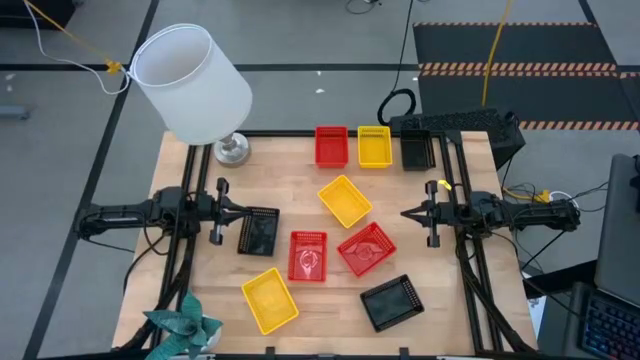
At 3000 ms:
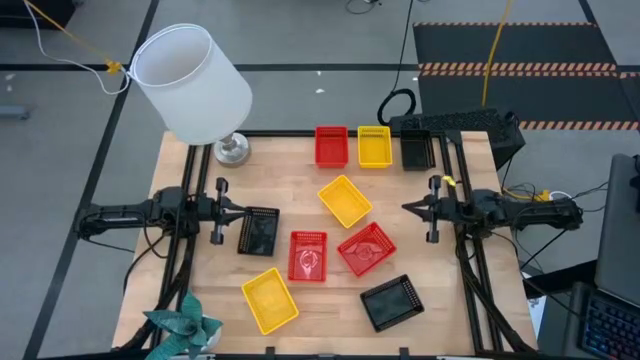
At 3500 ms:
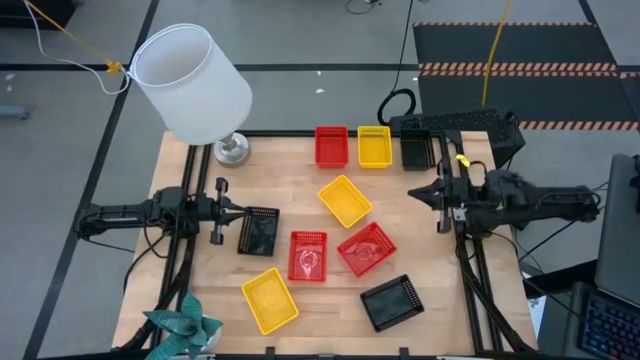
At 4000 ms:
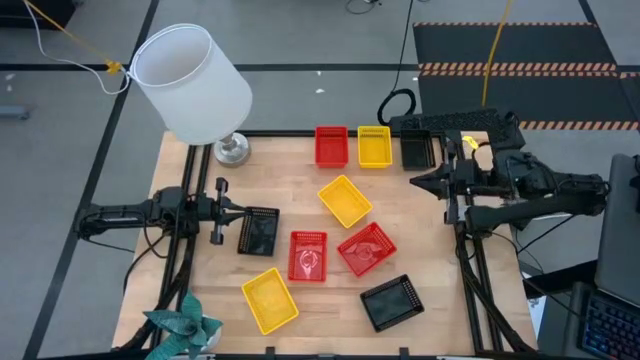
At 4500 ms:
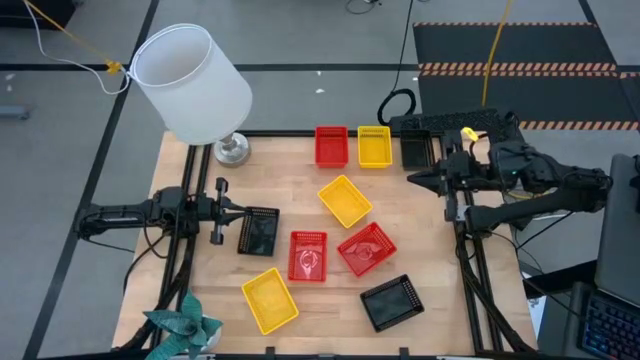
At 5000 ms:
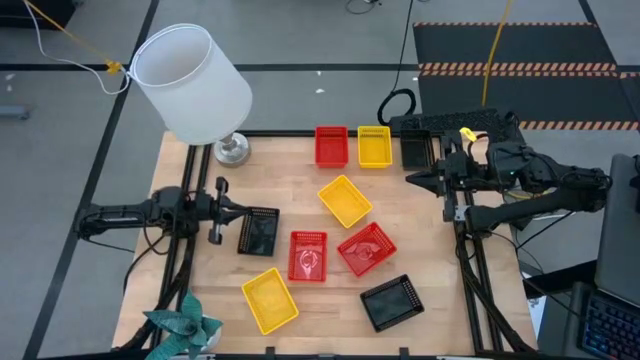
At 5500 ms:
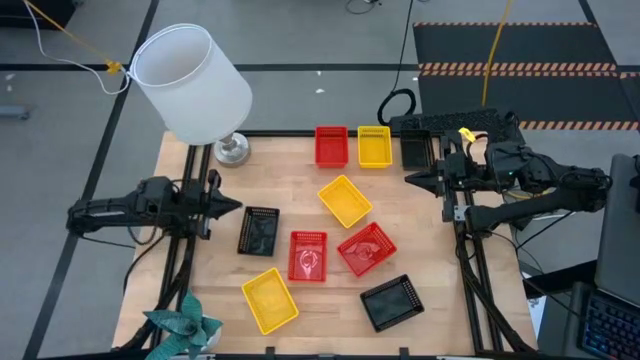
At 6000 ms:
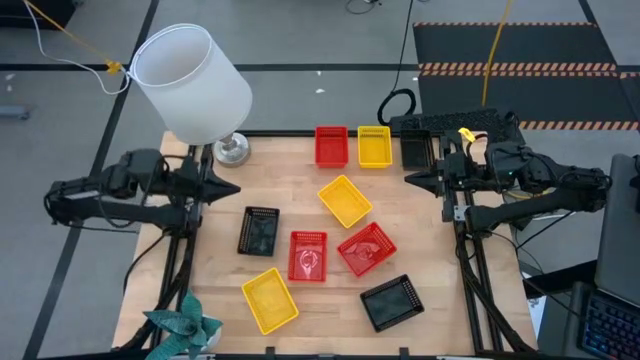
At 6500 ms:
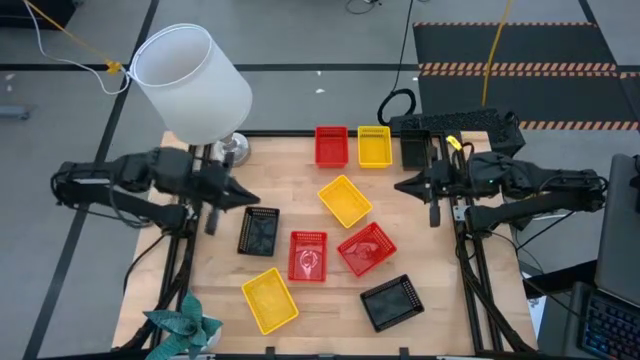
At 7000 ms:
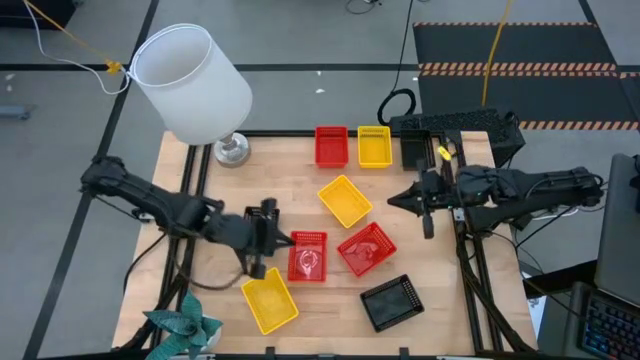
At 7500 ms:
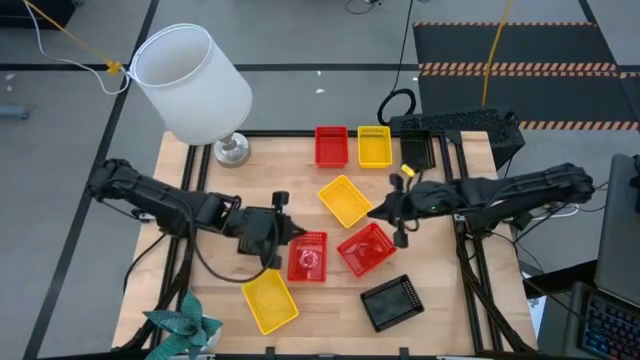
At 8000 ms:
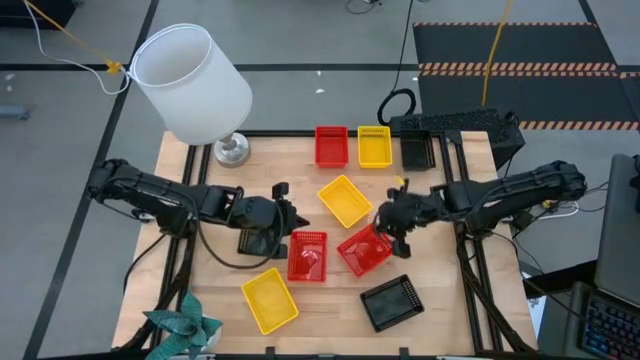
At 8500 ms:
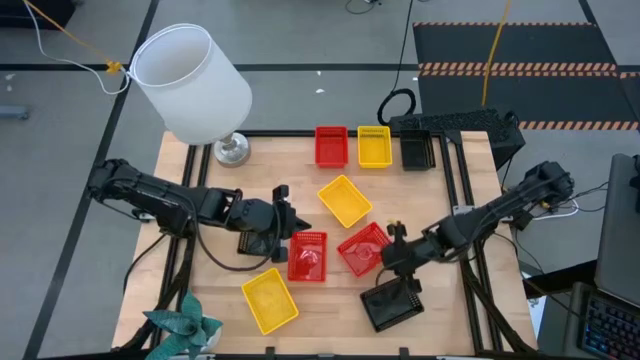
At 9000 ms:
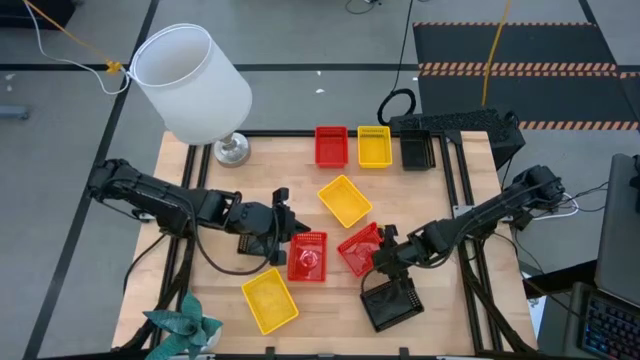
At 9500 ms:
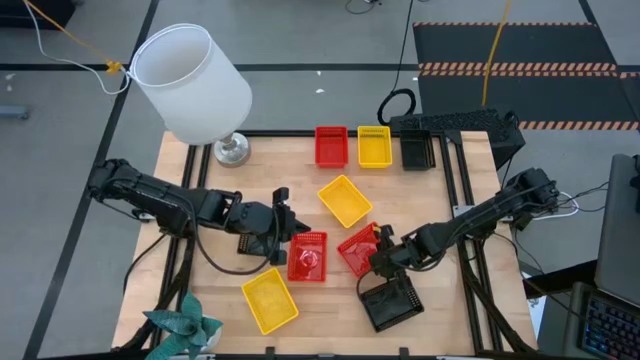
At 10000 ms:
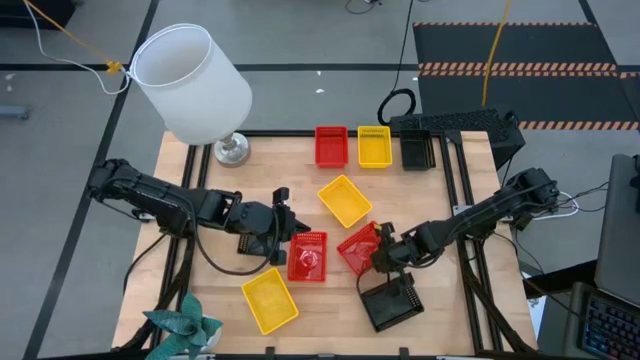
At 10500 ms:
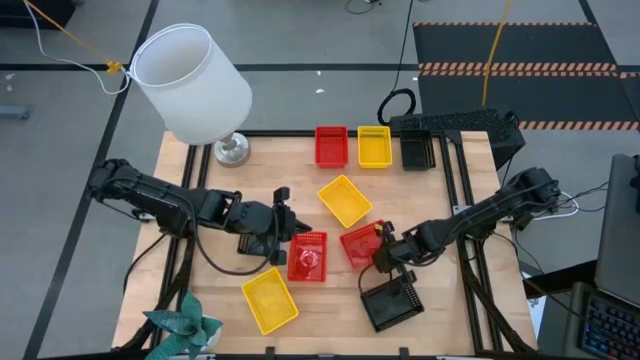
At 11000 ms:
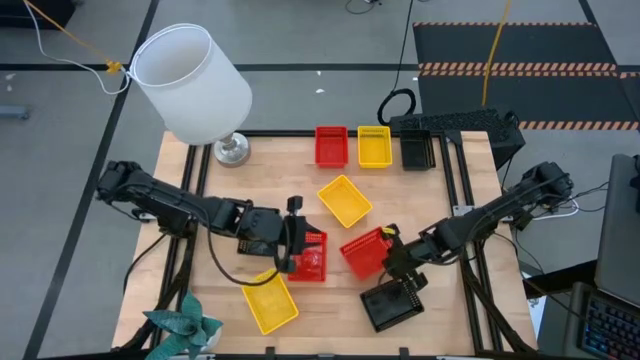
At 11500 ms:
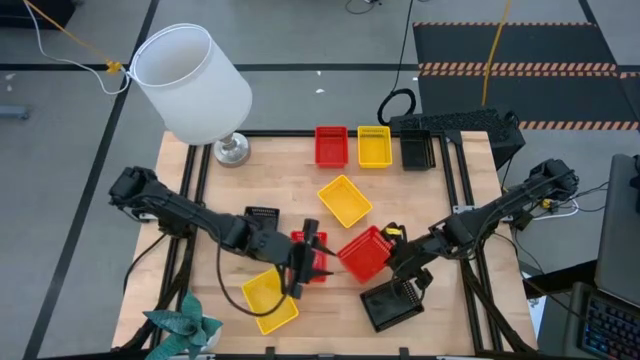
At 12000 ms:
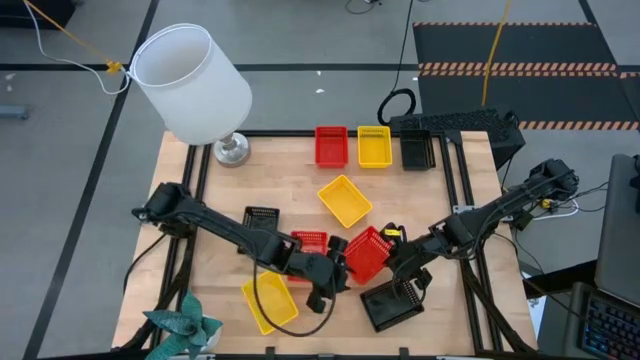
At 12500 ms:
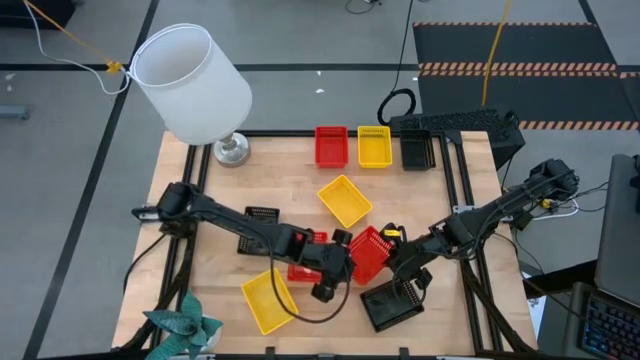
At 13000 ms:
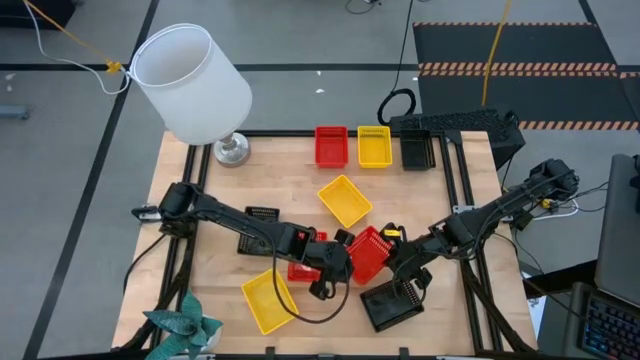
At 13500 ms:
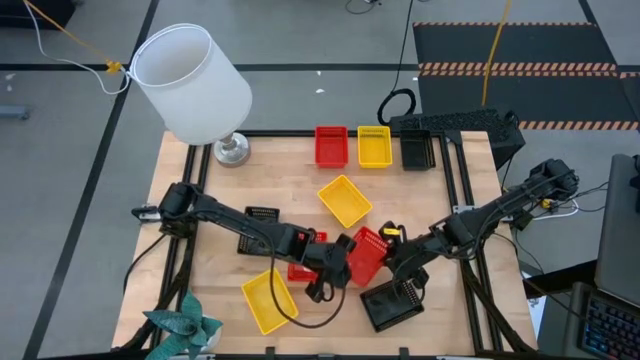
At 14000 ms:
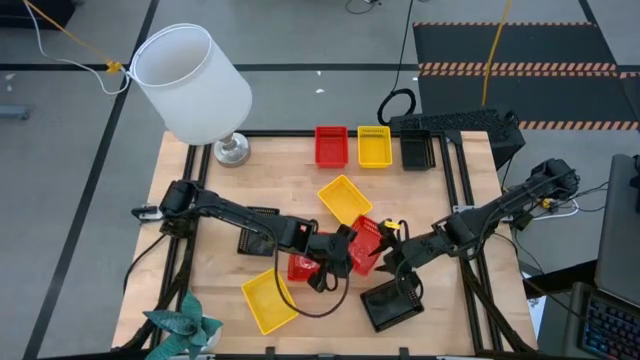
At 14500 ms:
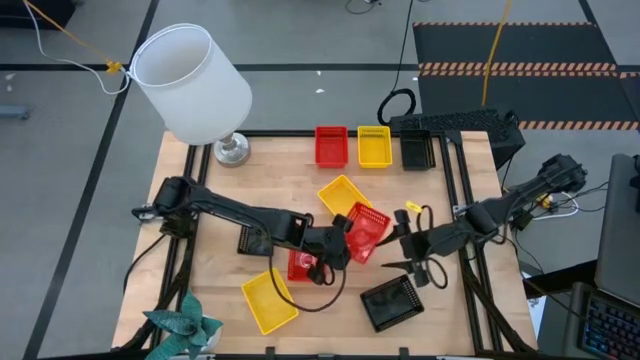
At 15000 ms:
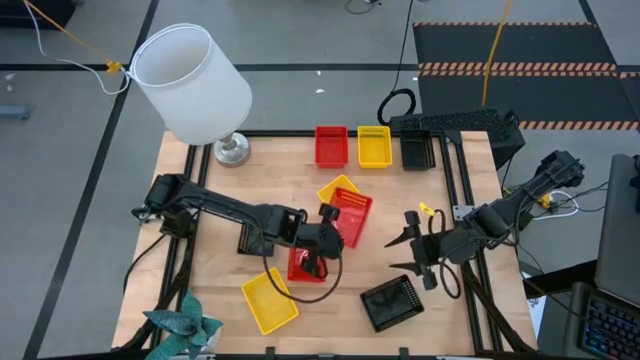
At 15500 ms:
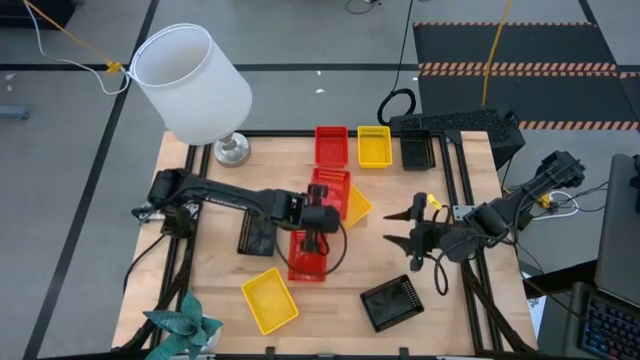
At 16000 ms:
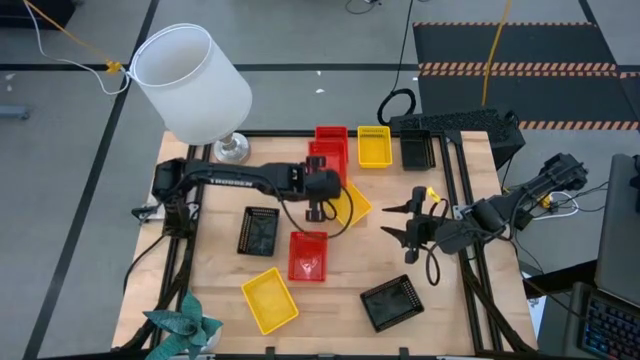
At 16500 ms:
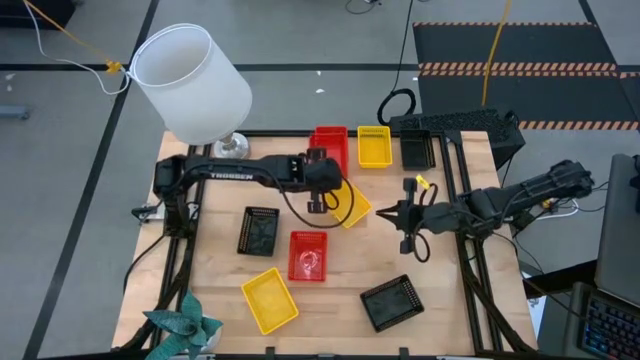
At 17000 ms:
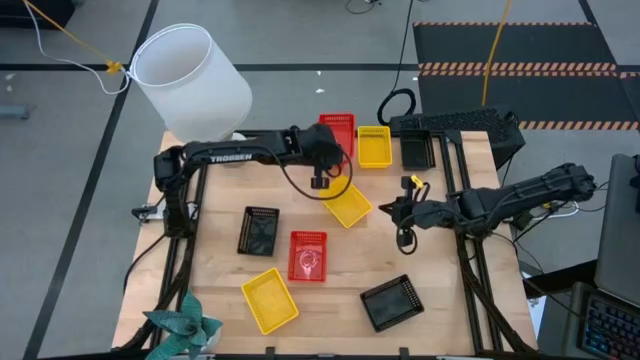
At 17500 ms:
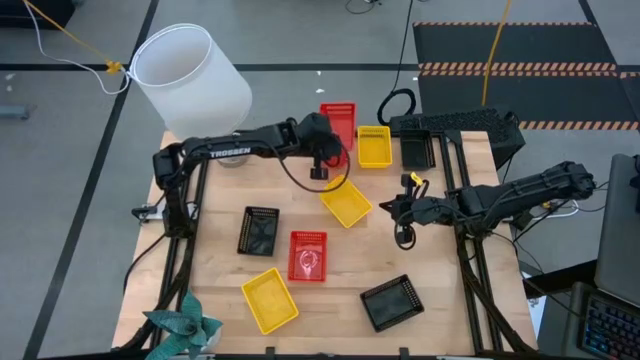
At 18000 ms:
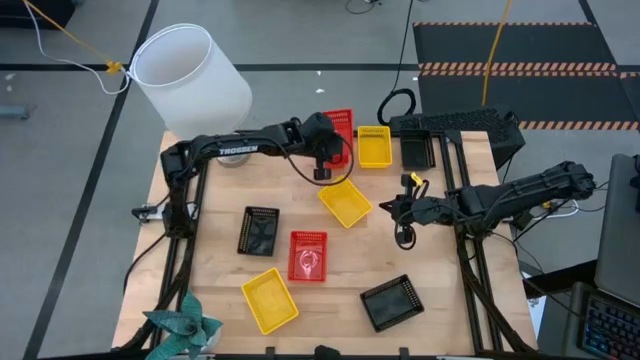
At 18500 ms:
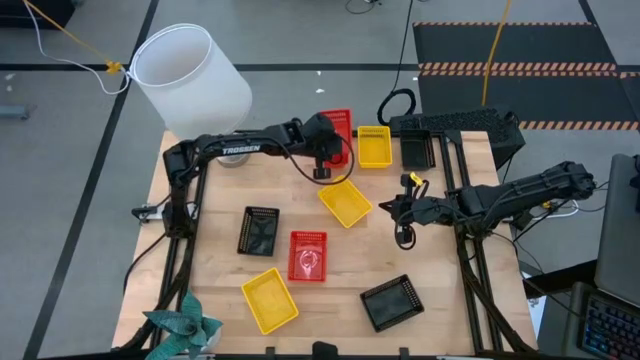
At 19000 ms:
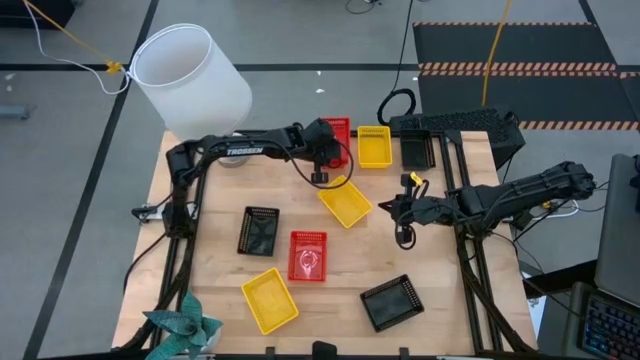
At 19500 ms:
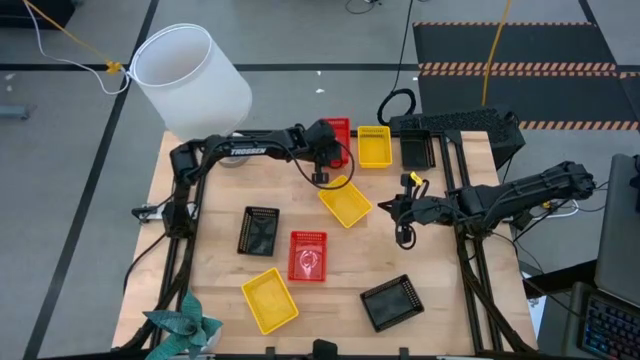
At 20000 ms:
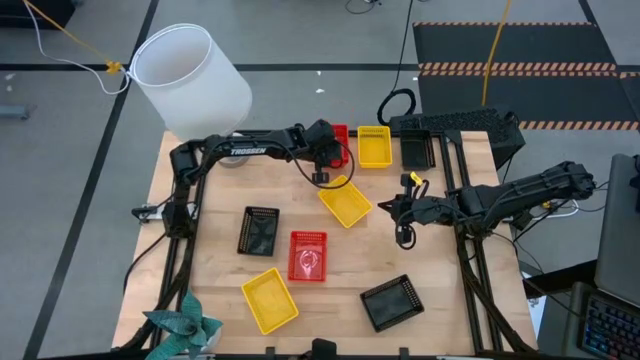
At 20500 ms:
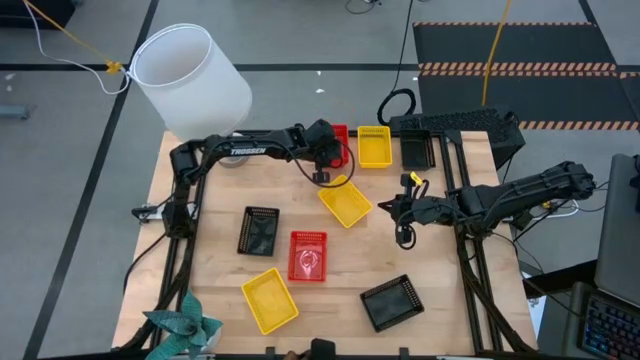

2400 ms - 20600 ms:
Stack the bottom right red bin on top of the top red bin

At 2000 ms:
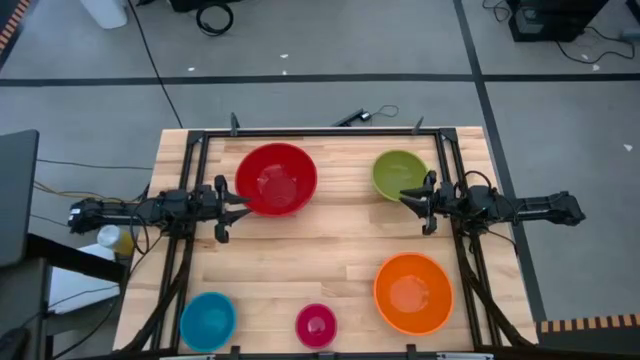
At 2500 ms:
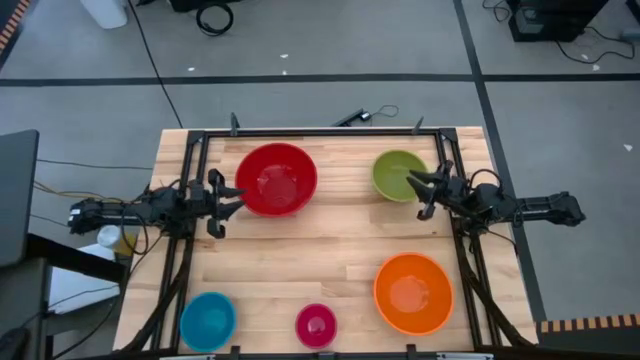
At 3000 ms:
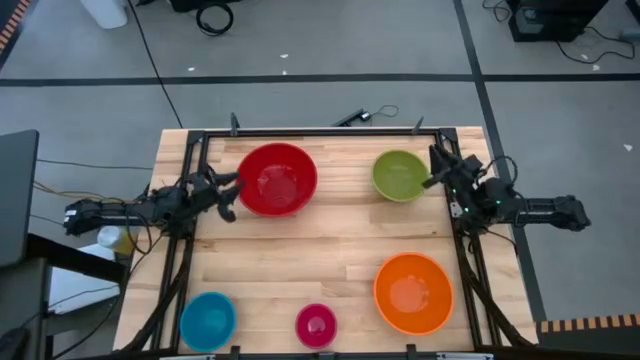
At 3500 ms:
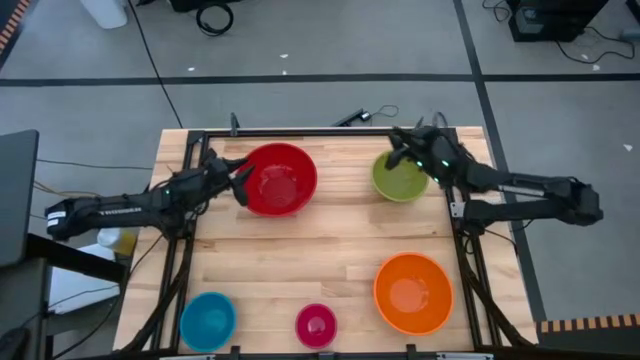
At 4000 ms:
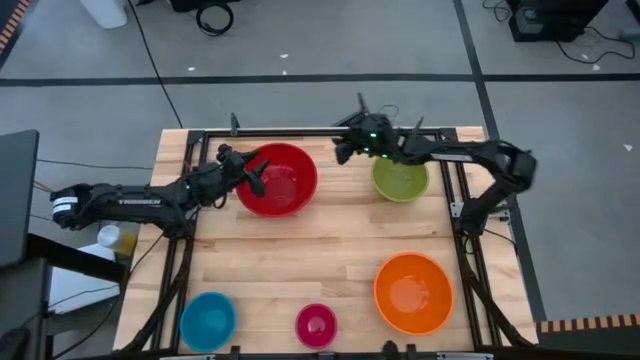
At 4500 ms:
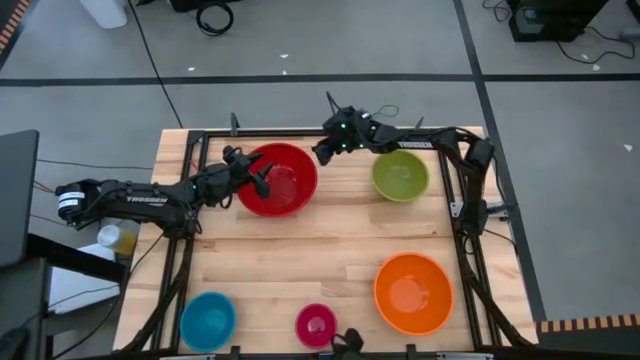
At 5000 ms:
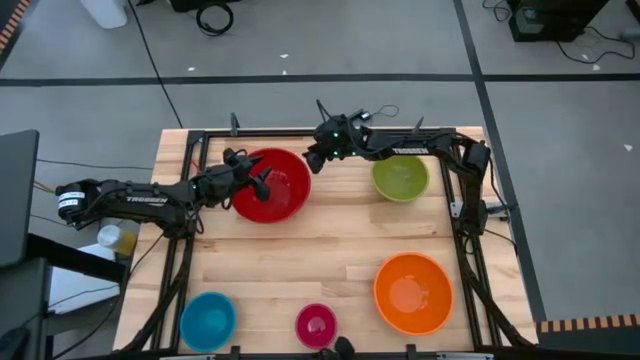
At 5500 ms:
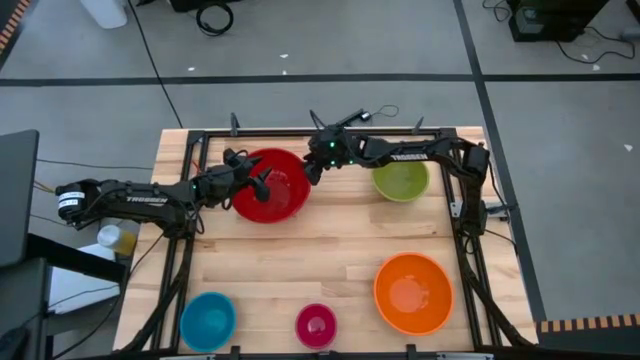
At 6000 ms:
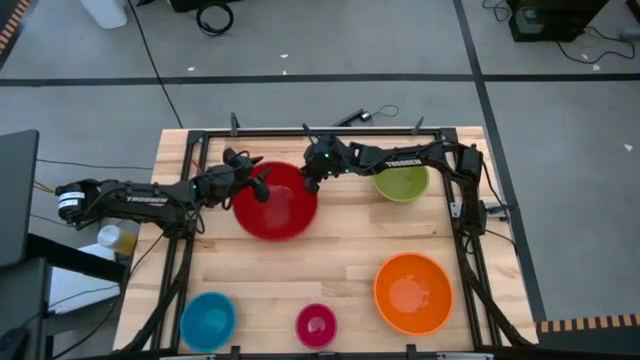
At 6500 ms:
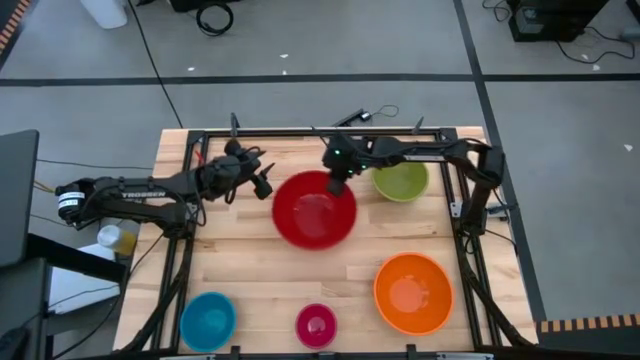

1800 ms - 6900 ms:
Move the red bowl to the center of the table
